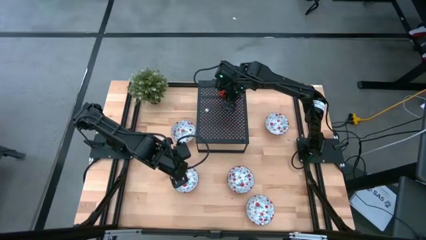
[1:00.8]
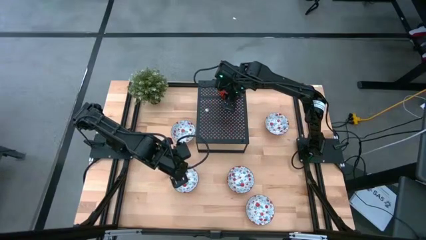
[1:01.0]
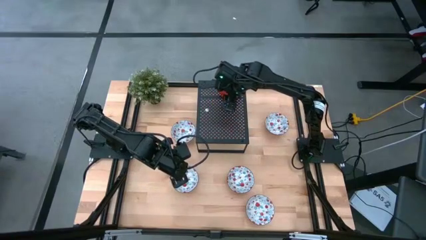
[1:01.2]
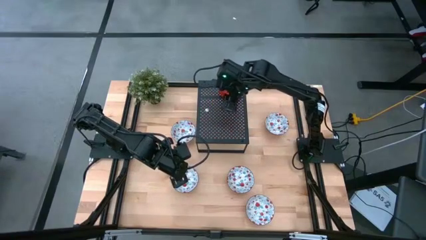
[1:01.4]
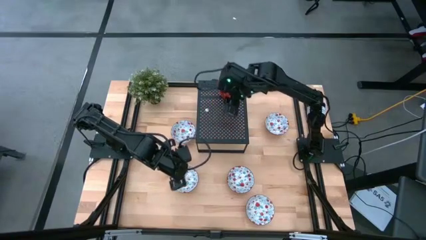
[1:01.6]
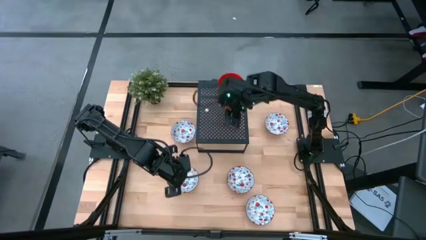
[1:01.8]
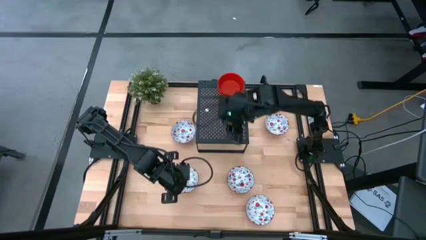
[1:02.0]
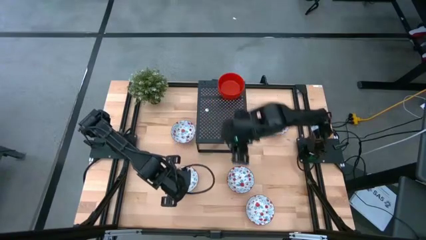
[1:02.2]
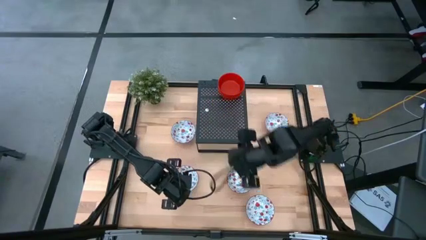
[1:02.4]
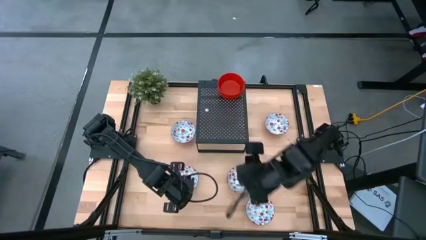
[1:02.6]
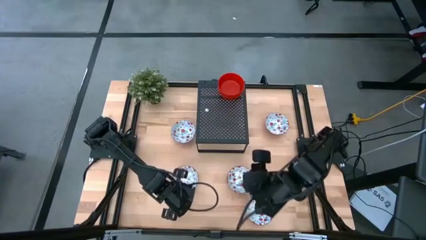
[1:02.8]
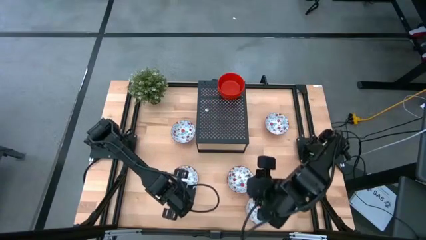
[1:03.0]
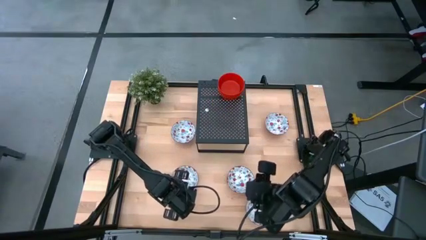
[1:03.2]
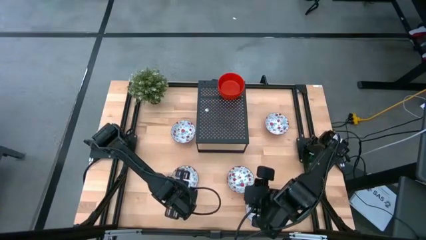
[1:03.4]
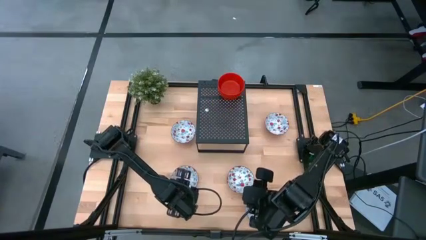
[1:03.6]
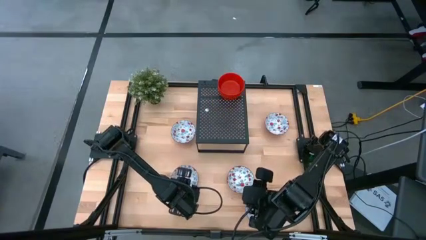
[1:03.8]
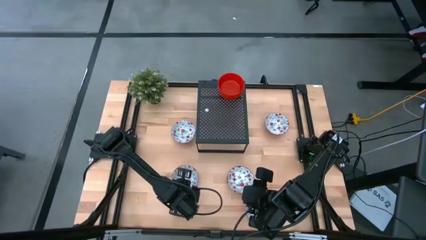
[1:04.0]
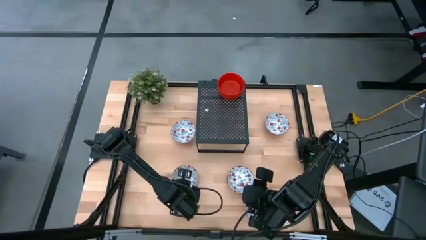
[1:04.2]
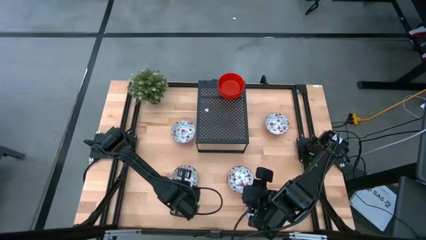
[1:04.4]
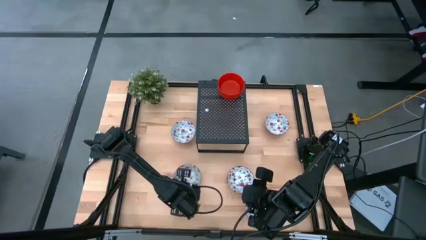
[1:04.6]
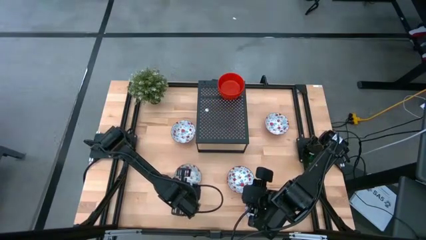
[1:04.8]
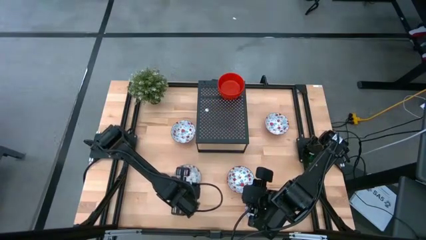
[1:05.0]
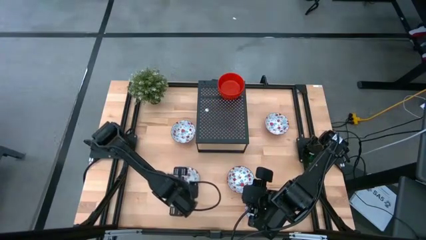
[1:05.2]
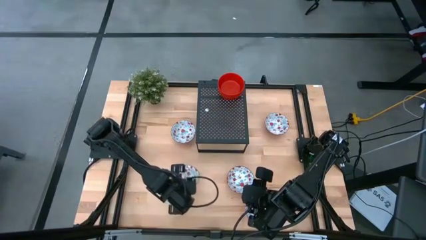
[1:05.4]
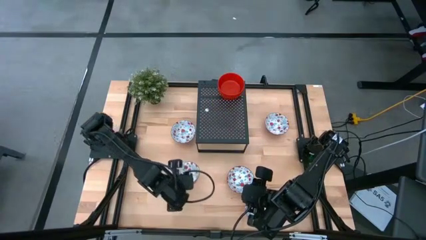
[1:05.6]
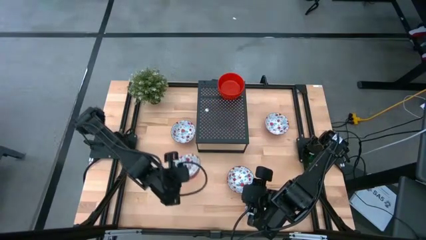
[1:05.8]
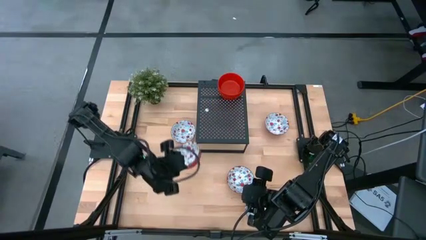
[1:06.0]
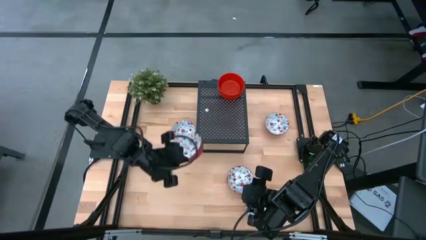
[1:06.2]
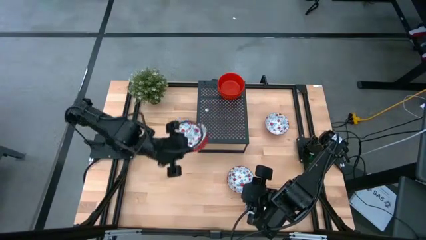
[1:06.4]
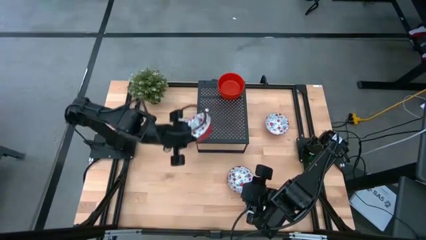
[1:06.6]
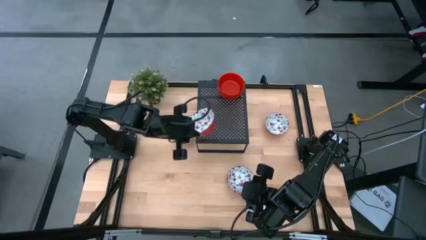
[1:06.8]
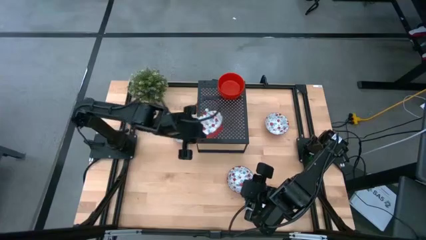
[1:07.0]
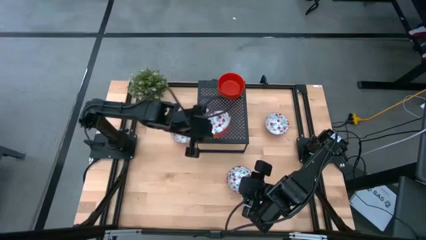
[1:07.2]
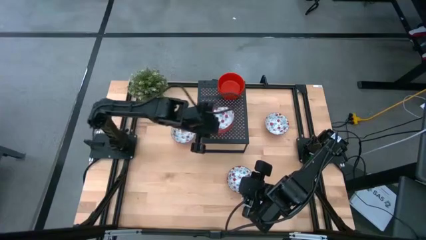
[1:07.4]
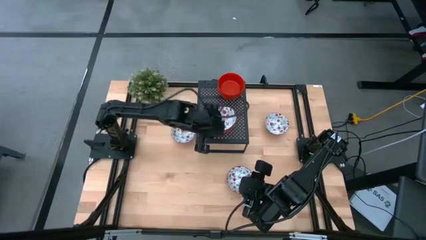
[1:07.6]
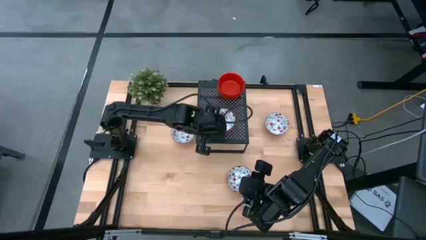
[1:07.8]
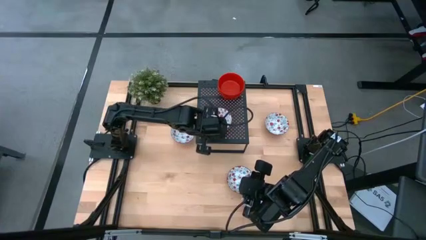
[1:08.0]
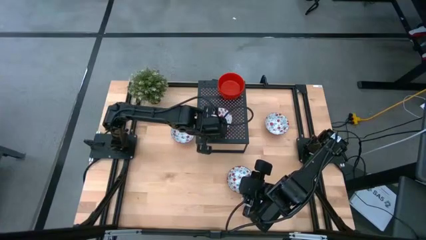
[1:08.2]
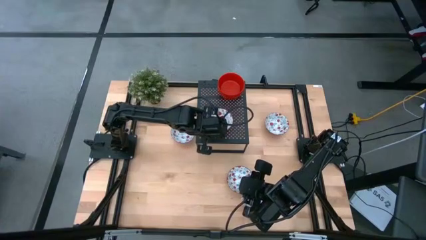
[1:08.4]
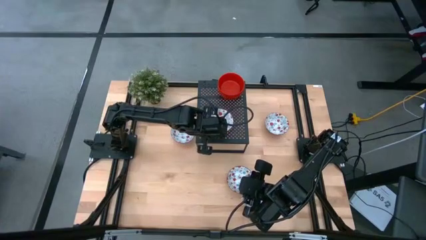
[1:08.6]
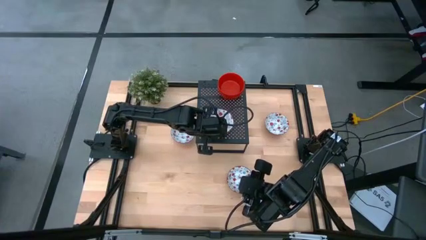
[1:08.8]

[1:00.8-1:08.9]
Task: Pick & Place Mini bowls
Put the white patterned bowl on the shelf

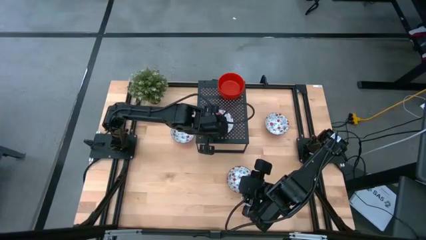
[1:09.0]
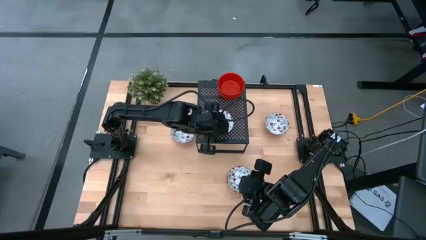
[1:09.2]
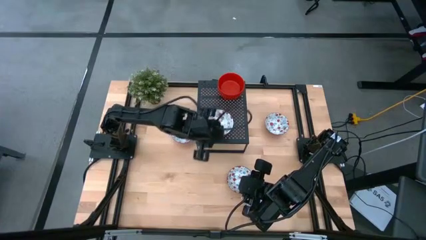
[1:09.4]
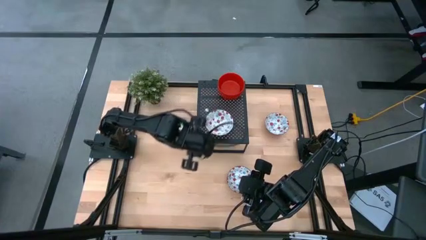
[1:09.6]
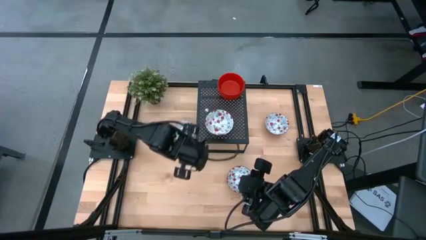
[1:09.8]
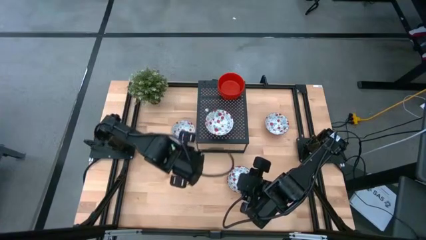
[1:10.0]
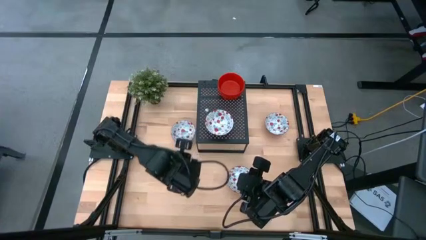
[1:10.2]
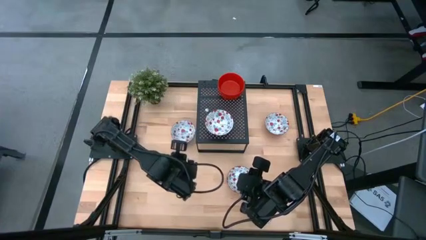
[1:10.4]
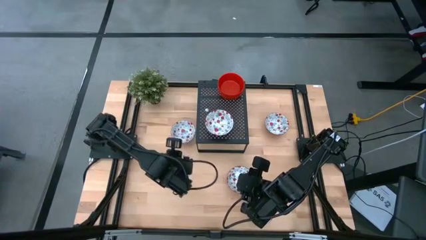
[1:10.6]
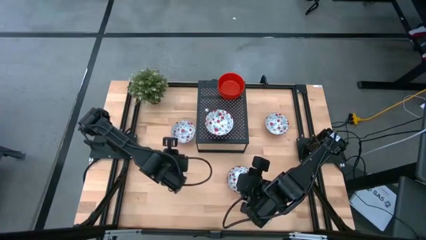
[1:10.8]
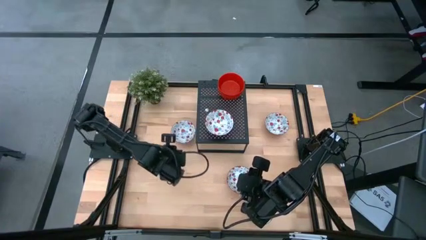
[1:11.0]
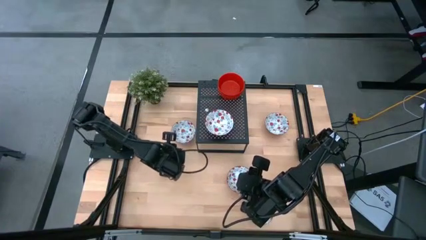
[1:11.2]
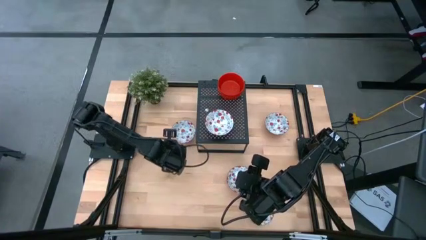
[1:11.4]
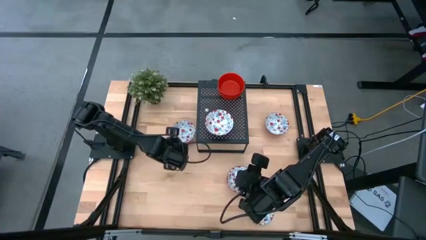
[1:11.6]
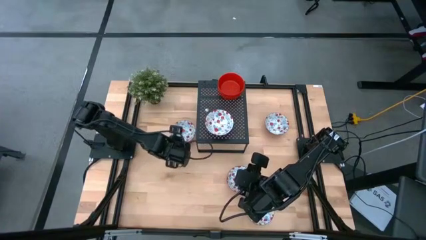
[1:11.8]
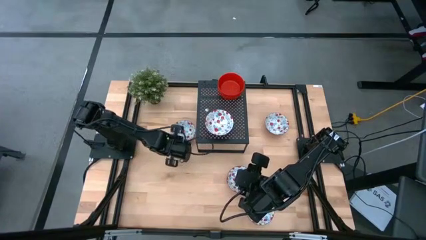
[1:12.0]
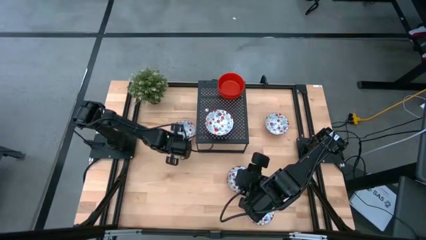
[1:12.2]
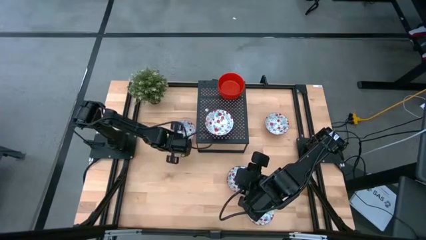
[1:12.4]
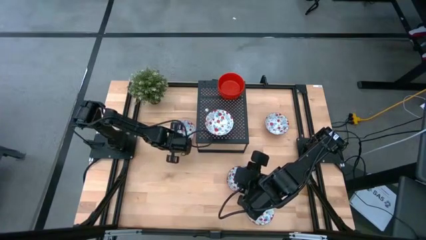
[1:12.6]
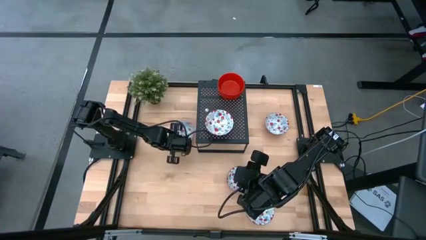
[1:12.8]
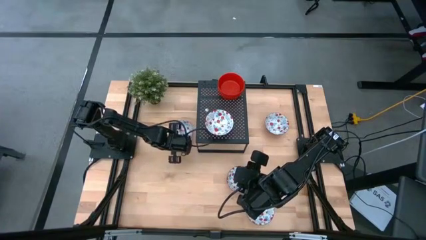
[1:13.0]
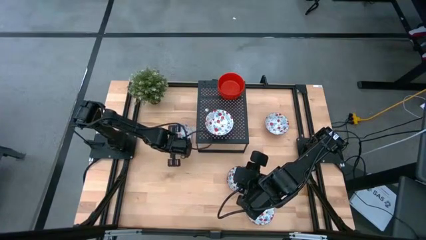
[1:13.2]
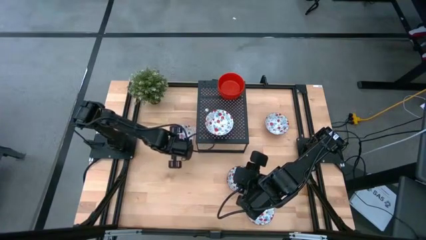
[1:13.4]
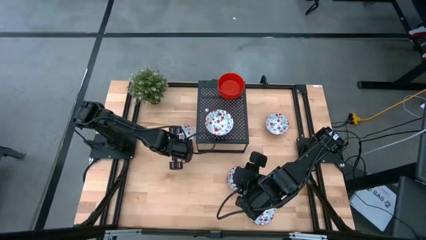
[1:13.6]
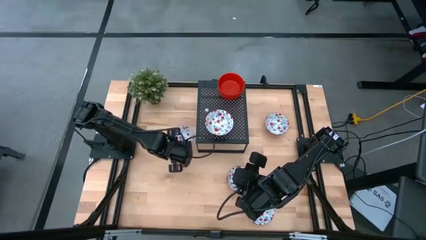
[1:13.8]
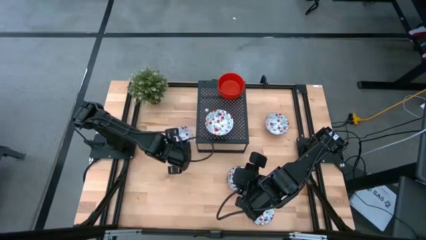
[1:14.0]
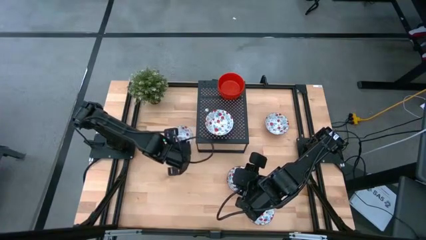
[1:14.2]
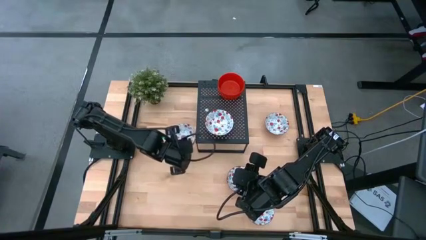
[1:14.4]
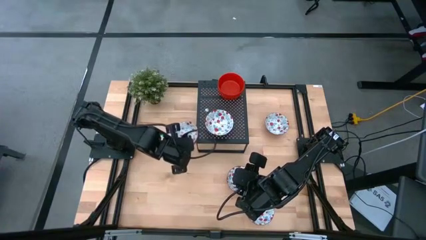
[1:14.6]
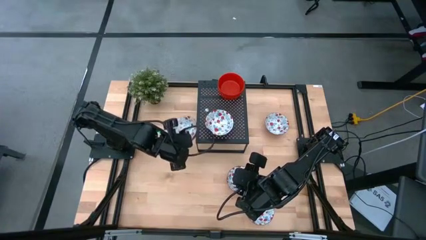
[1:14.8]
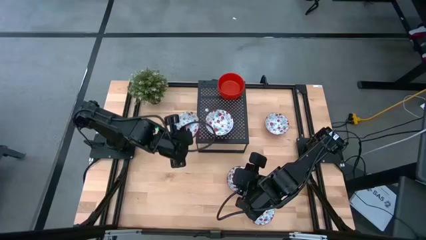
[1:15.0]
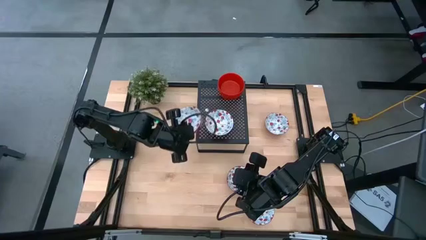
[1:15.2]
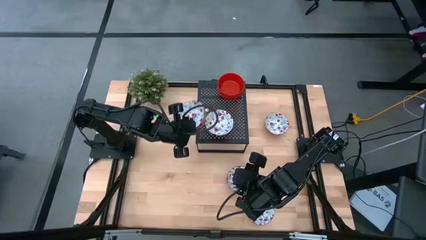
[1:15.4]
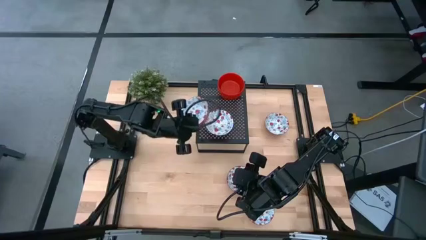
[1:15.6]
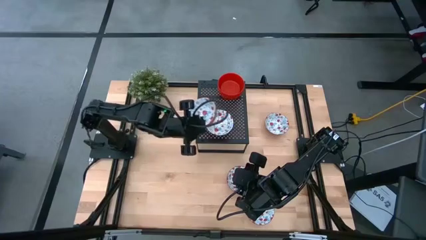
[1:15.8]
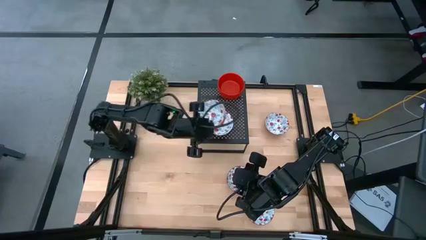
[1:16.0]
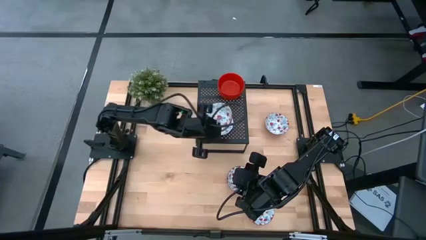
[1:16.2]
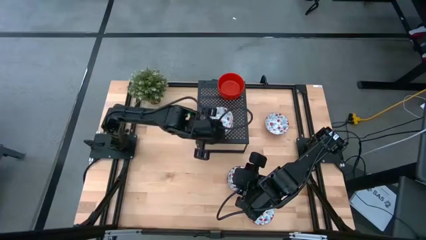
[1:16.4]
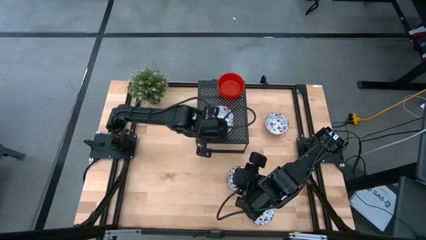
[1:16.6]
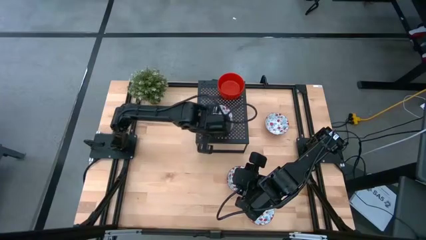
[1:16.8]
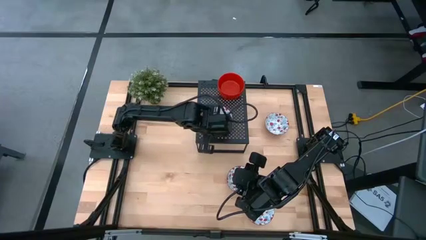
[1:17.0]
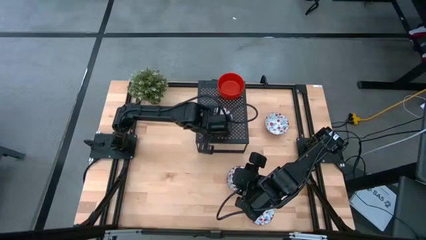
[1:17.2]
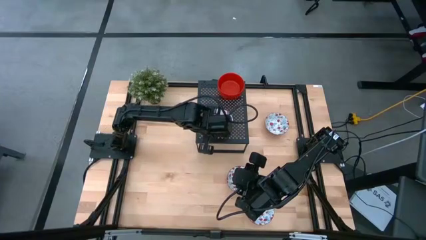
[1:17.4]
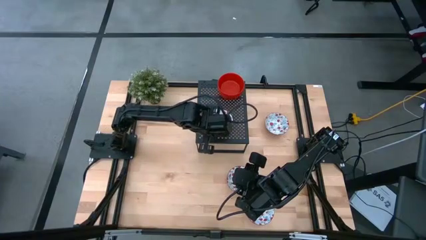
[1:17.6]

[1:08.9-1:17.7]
Stack the white patterned bowl on top of the other white patterned bowl on the shelf
